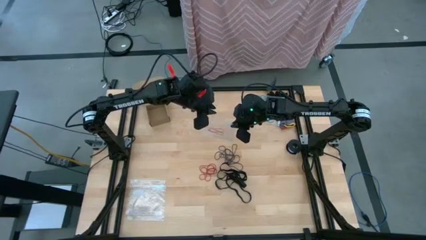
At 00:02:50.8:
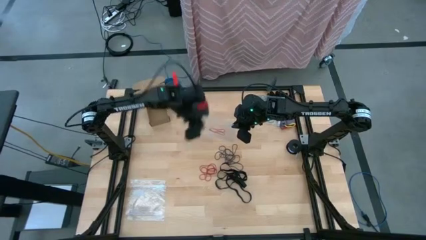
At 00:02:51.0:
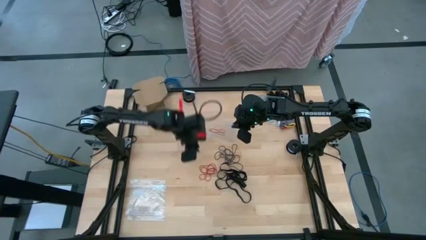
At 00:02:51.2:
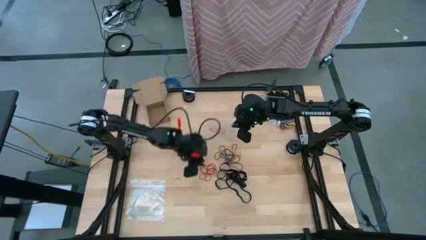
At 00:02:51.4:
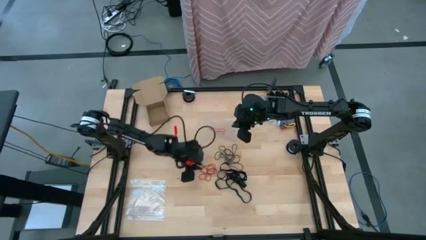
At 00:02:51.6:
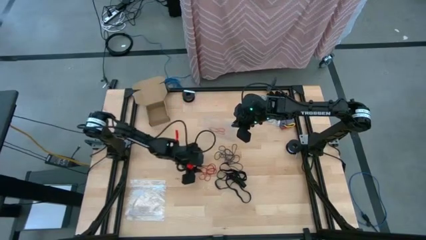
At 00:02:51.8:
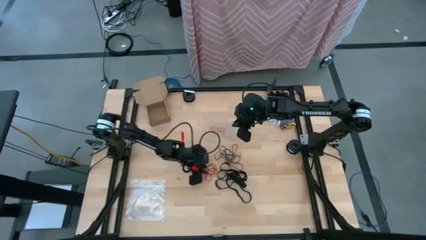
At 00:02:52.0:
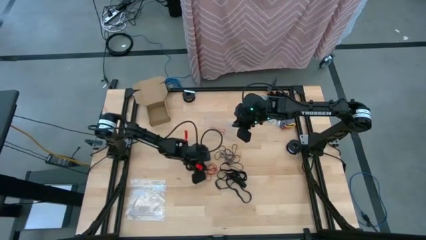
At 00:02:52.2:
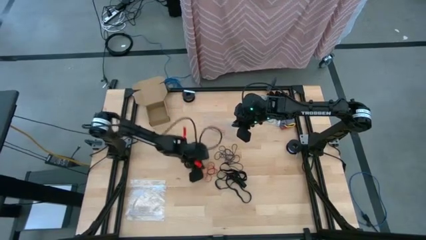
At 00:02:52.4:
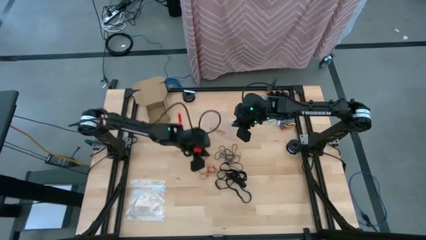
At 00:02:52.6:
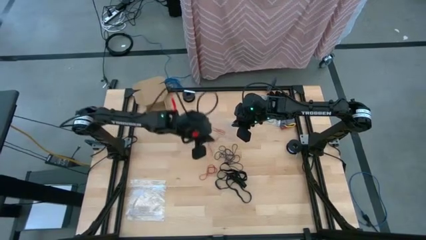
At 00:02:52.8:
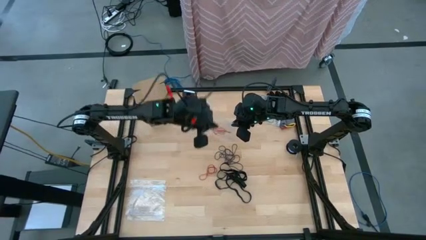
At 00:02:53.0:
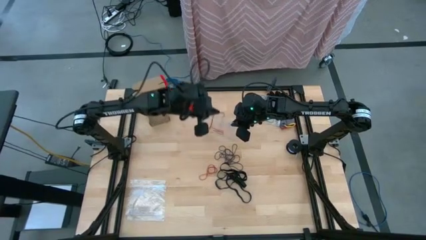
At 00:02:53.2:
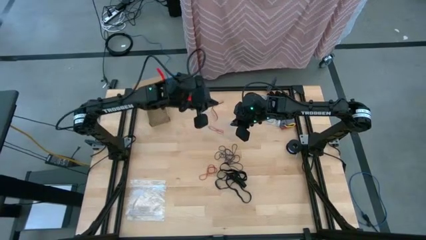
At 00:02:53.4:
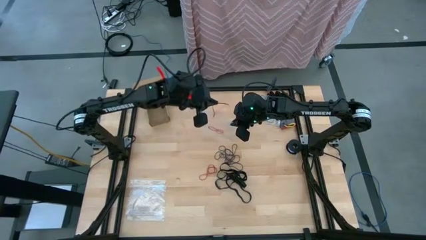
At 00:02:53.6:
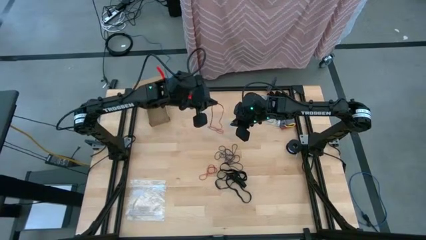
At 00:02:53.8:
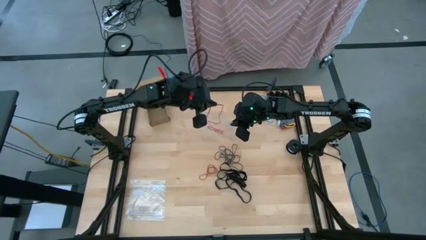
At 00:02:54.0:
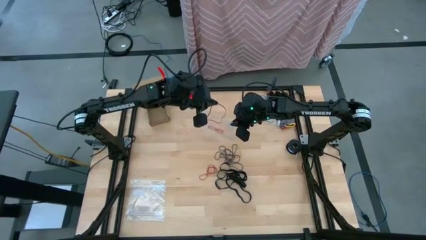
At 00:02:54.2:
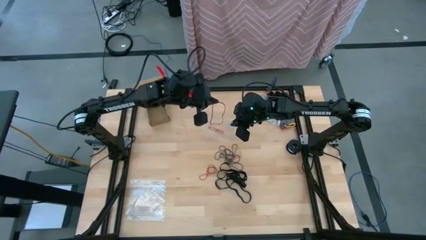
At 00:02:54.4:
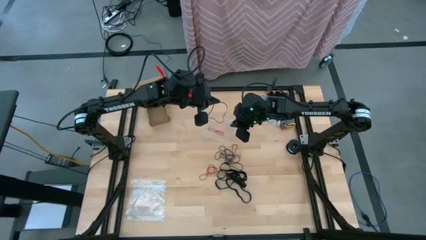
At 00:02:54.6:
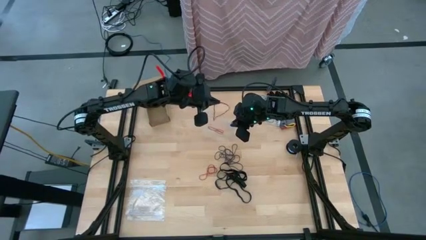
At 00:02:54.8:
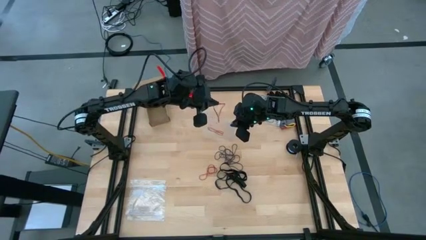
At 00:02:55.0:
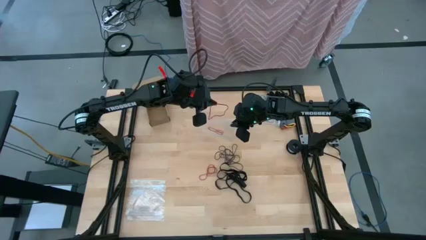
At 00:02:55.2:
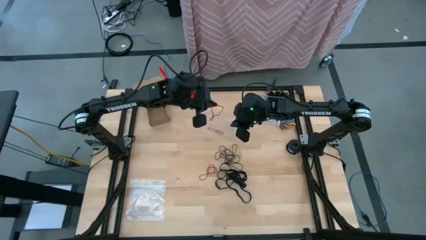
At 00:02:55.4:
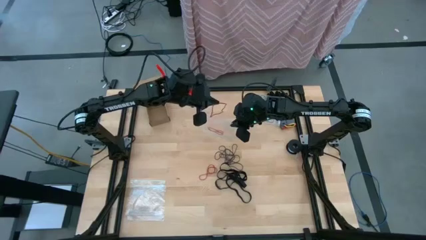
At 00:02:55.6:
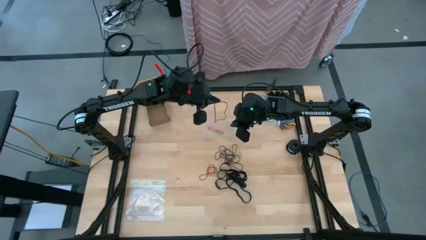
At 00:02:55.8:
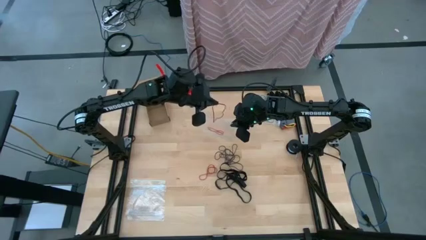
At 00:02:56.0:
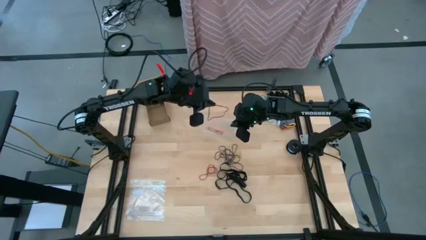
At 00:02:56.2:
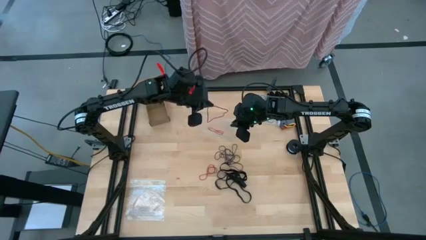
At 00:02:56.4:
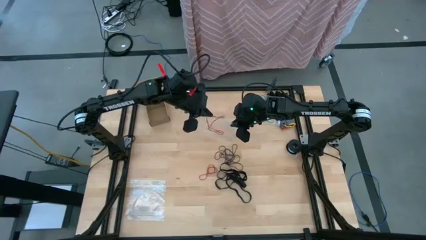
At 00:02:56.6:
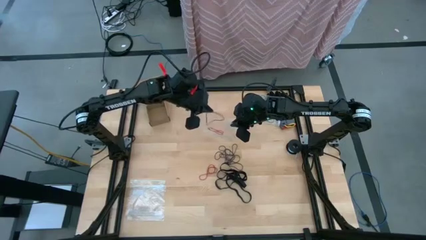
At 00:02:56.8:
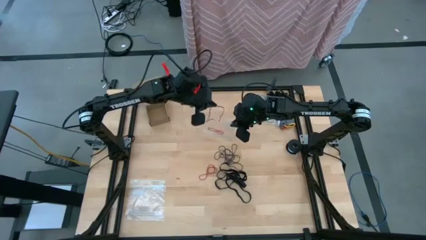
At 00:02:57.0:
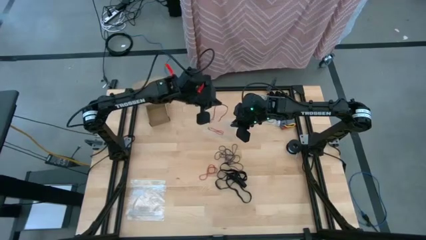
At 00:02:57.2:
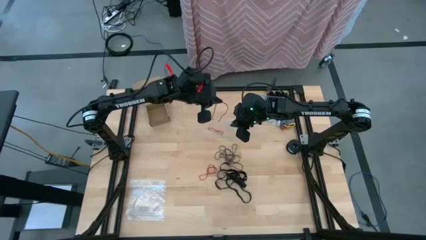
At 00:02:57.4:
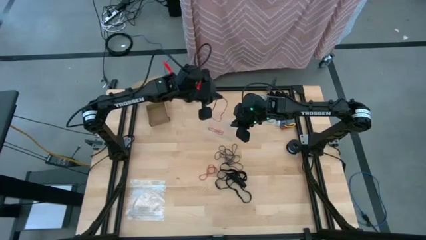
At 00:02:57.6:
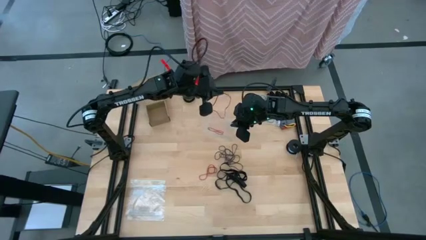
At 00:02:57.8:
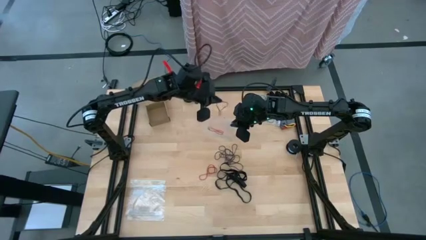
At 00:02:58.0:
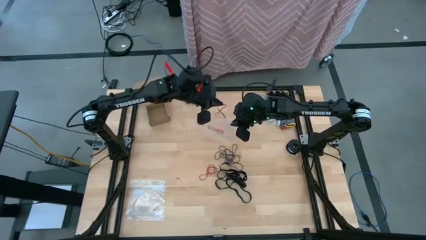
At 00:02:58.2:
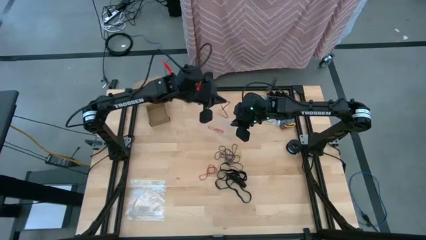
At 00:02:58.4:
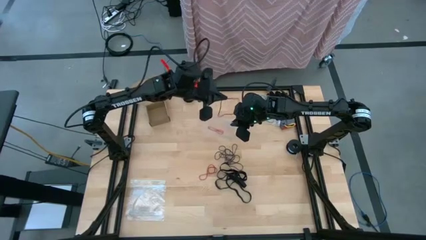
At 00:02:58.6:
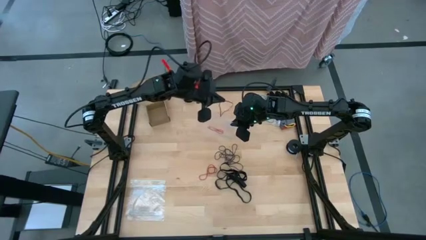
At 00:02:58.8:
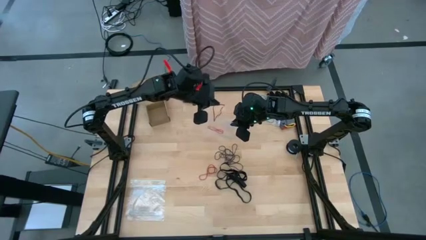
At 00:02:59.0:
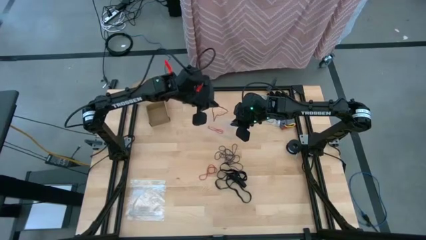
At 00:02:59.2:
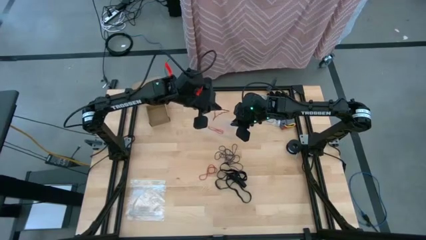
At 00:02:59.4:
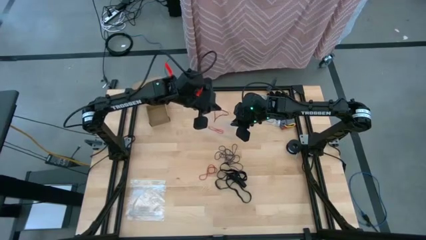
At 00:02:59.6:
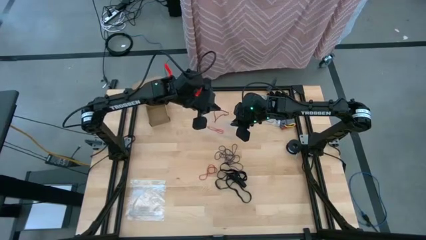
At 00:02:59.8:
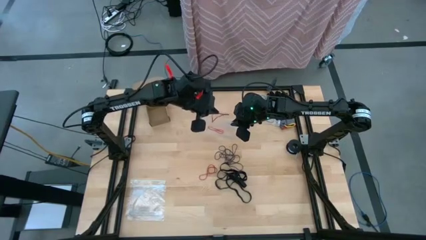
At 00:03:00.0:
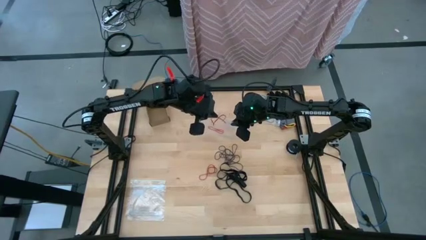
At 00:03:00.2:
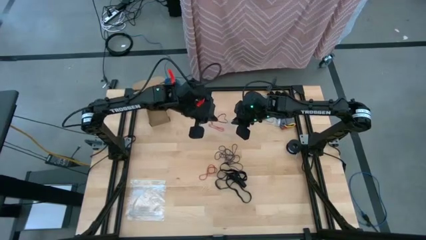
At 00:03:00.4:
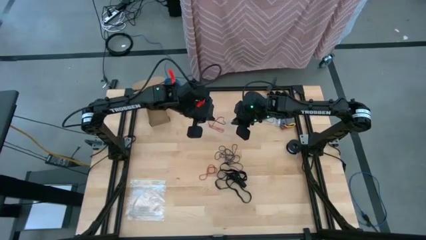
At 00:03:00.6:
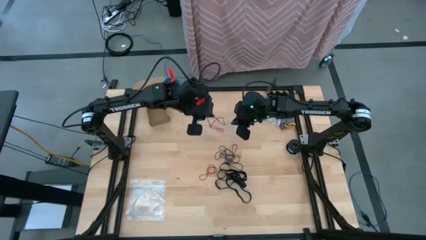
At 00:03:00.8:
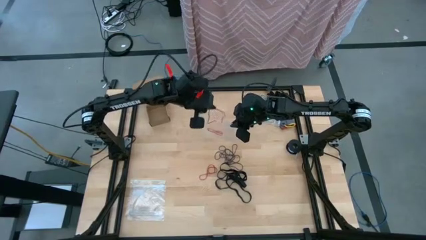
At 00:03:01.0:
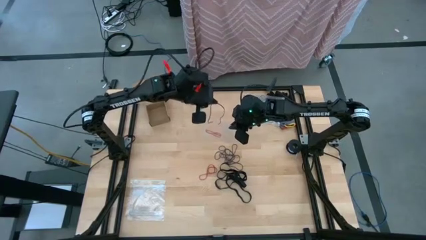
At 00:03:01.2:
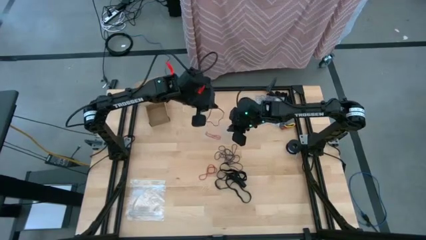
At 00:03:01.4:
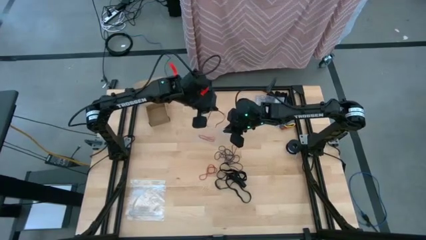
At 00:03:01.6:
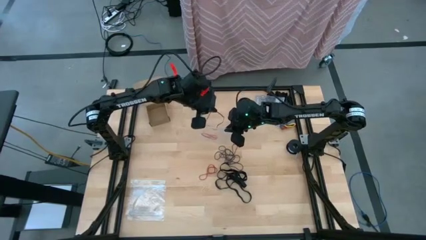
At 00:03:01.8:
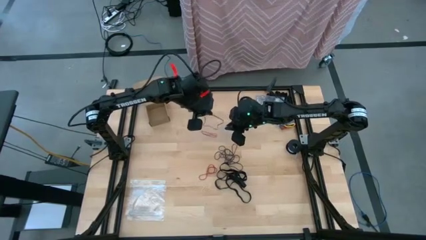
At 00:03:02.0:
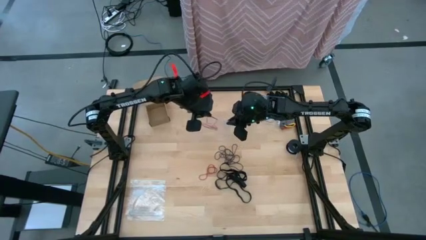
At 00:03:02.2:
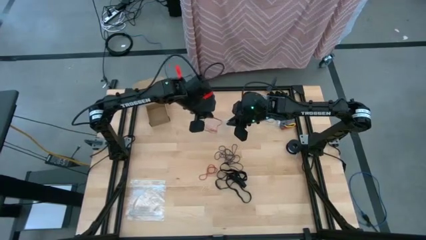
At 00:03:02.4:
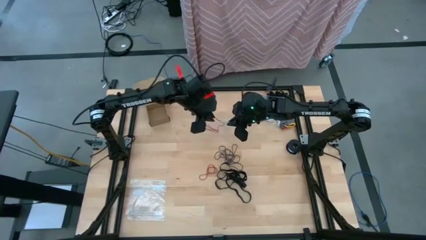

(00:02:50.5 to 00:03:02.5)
Task: Sort rubber bands
Put the red rubber band into the transparent zip bag

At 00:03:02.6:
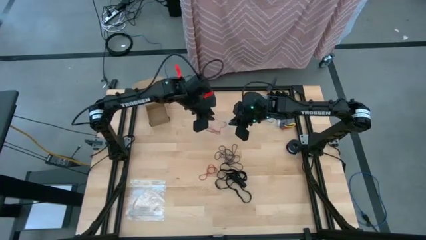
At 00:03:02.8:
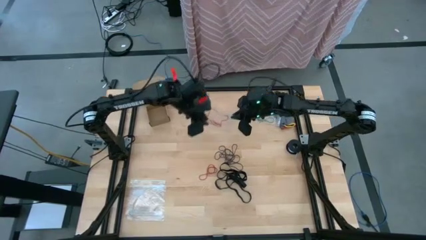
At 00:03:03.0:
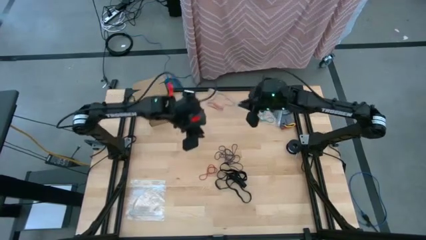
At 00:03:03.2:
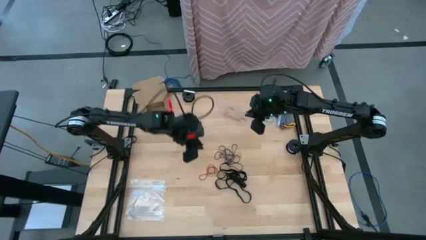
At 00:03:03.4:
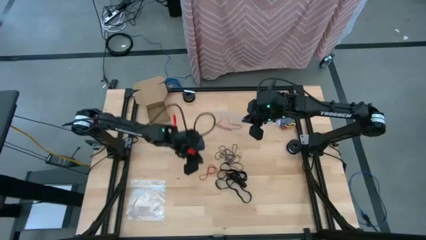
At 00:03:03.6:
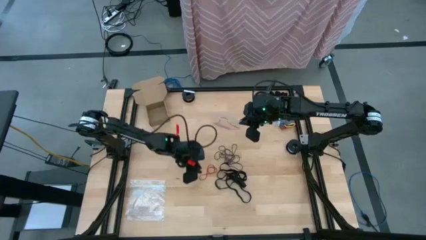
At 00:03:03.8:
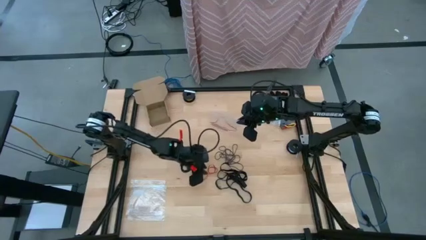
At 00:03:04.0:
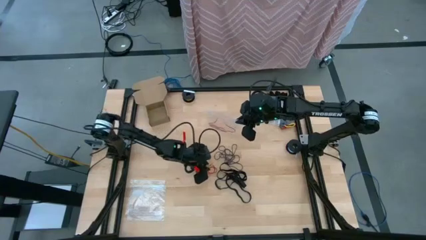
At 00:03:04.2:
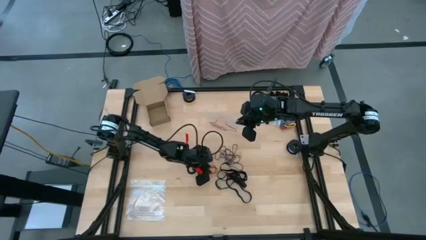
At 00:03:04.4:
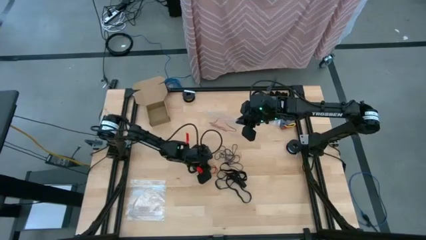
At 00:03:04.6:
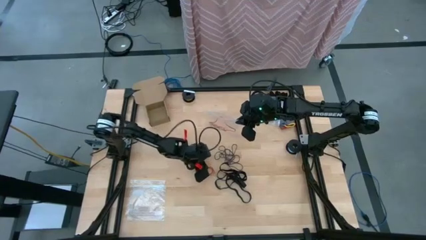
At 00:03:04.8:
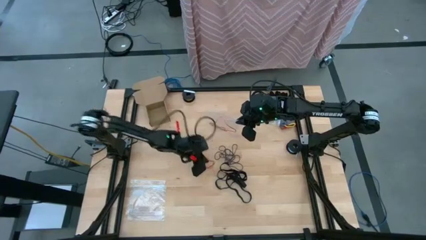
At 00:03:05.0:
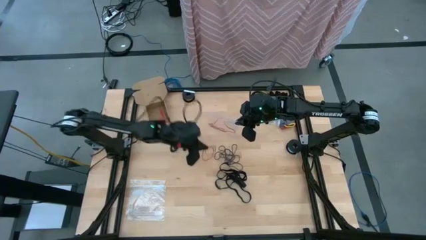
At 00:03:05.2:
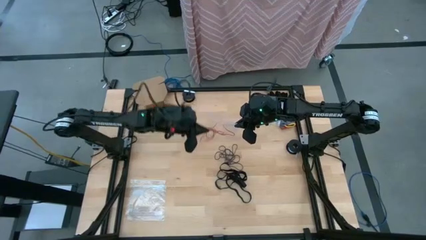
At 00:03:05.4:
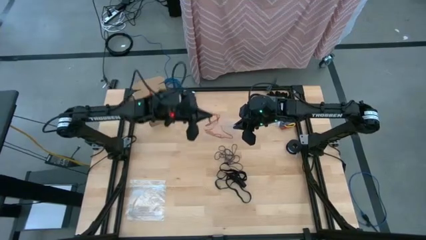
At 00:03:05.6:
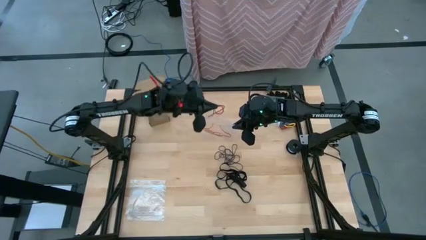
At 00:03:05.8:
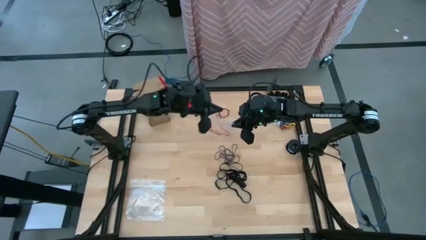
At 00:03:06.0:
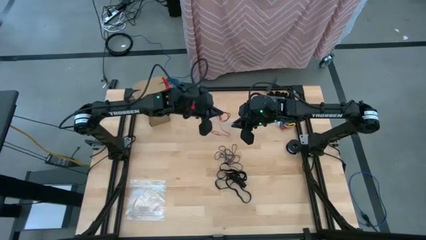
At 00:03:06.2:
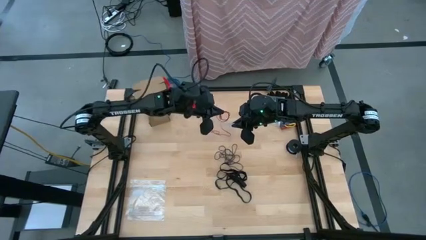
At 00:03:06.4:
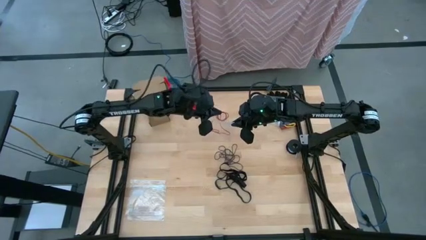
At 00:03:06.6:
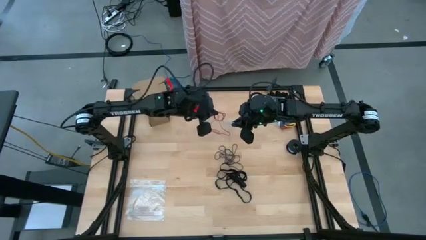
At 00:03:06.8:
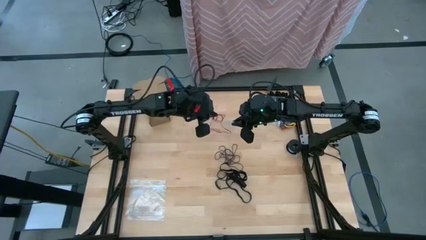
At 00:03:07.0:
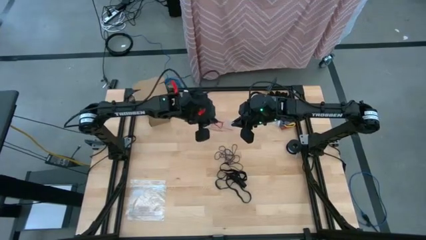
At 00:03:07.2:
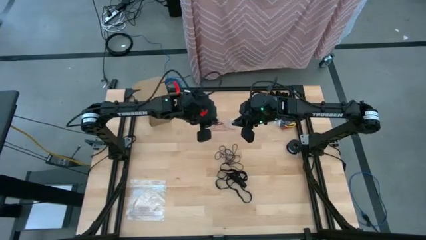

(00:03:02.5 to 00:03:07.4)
Put the red rubber band into the zip bag
